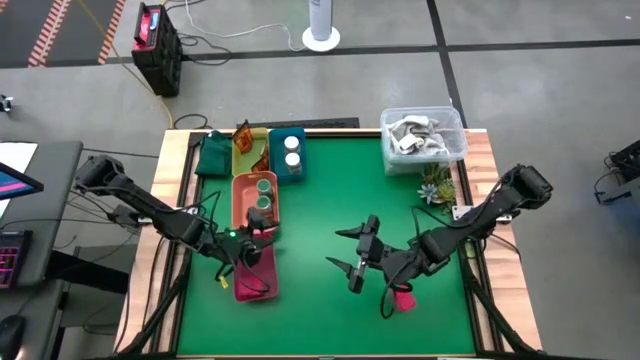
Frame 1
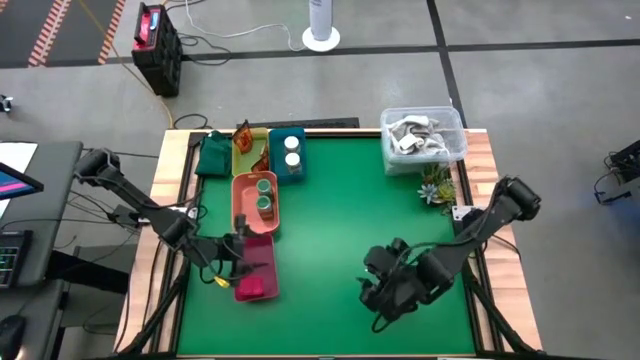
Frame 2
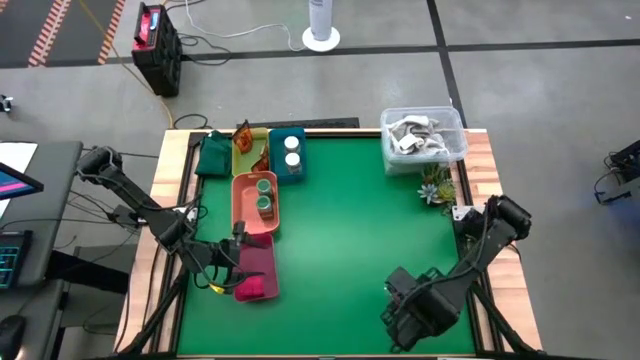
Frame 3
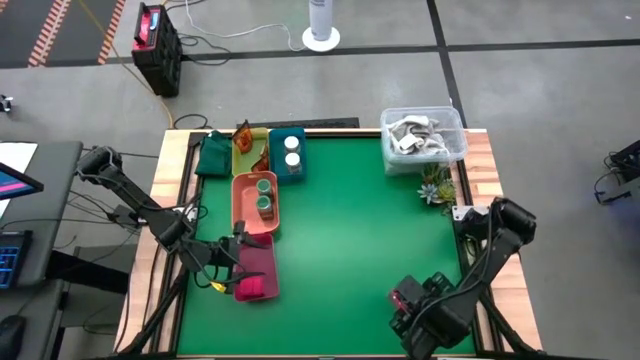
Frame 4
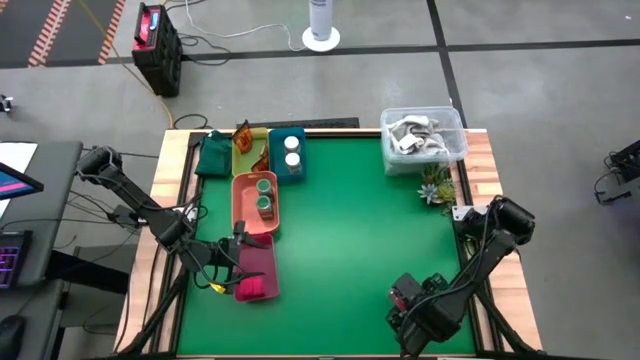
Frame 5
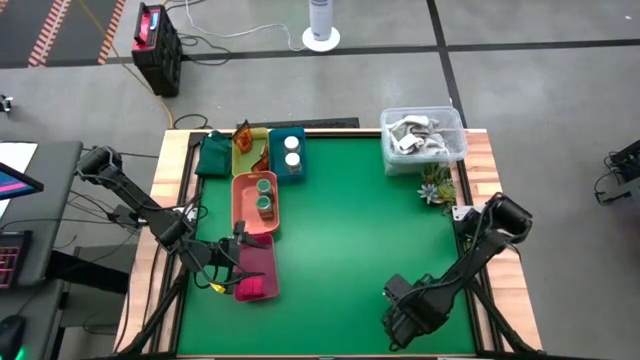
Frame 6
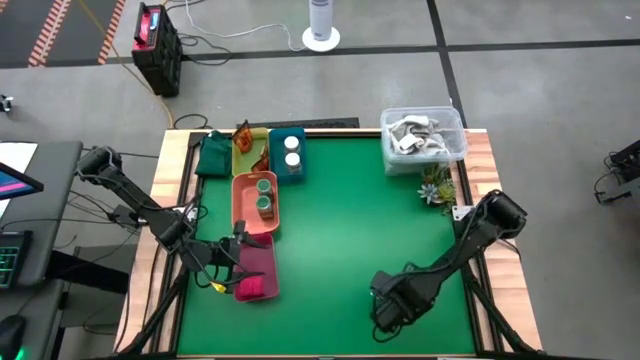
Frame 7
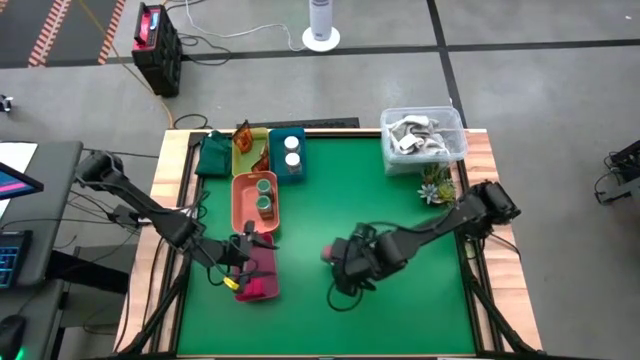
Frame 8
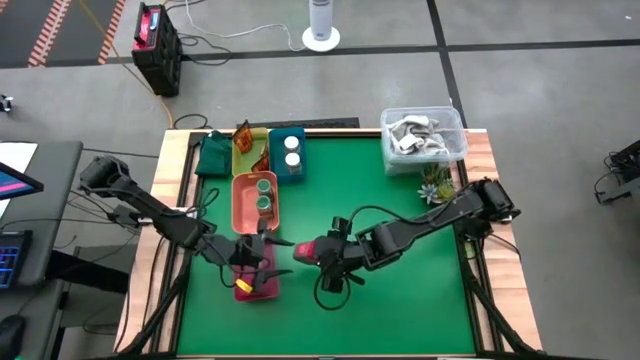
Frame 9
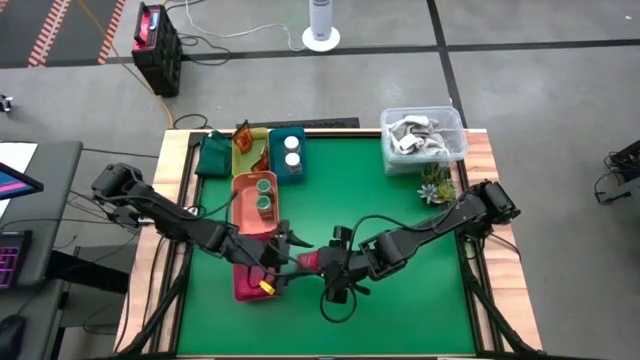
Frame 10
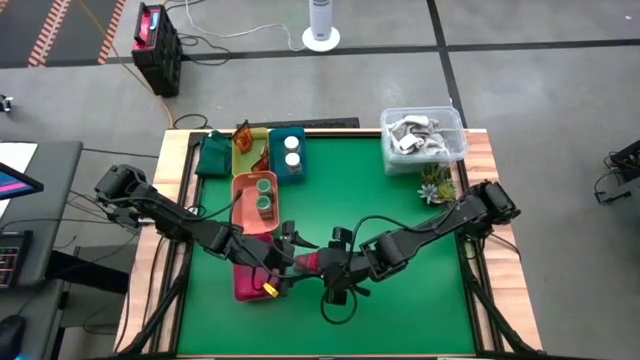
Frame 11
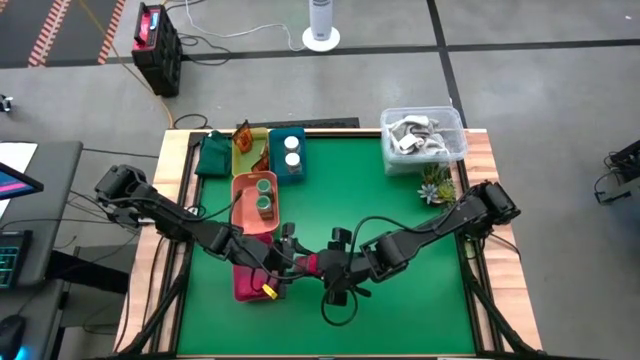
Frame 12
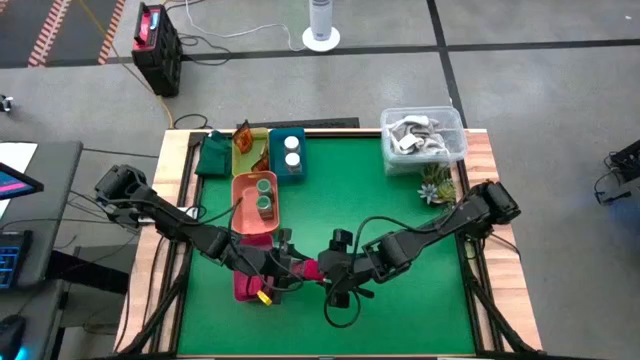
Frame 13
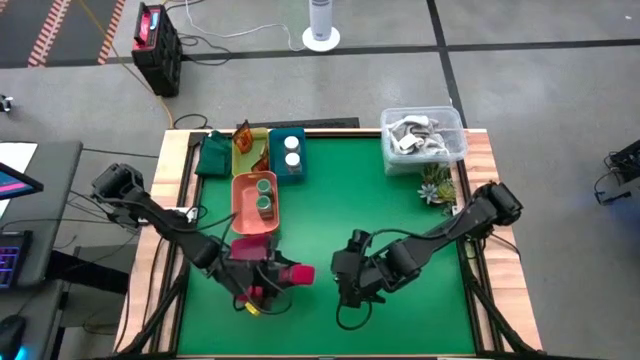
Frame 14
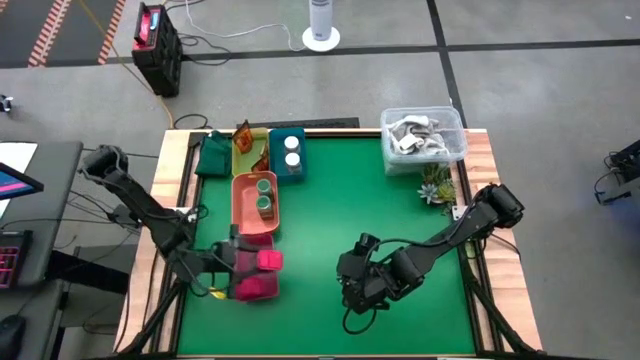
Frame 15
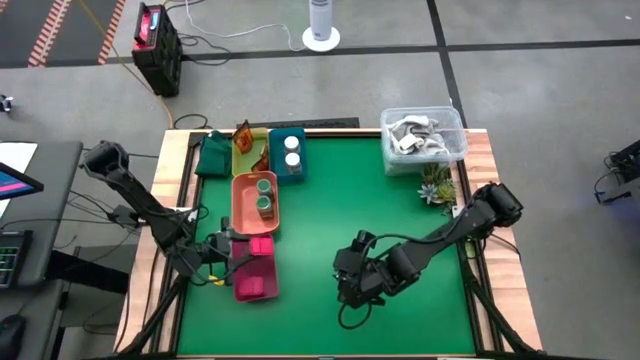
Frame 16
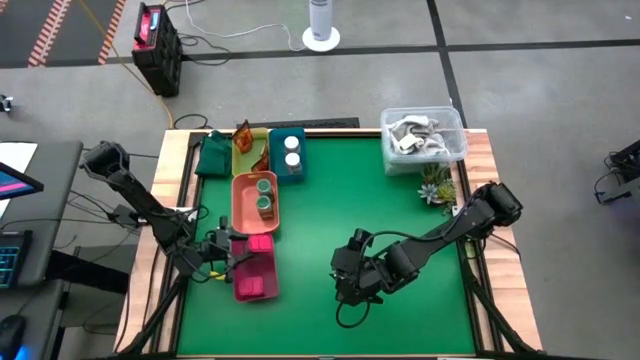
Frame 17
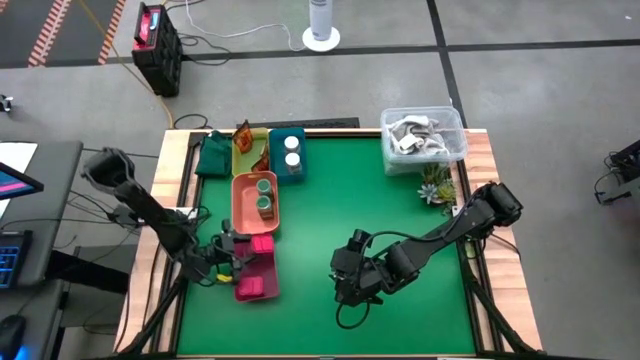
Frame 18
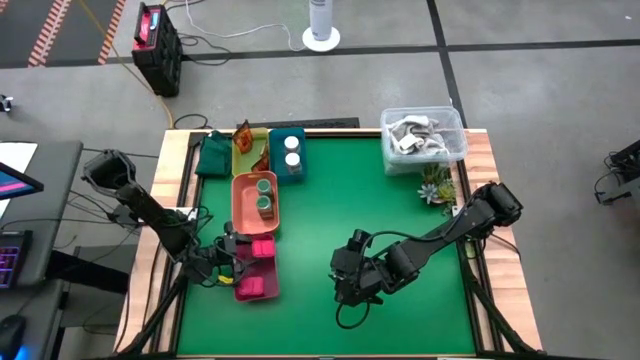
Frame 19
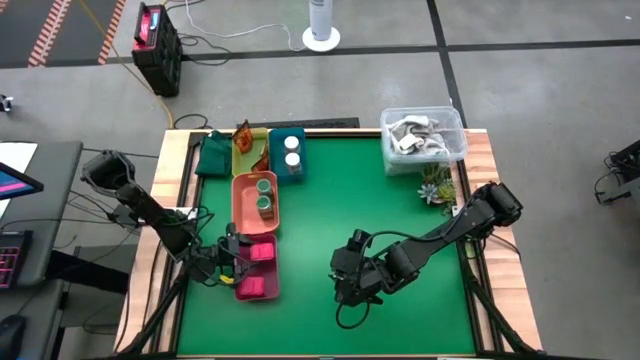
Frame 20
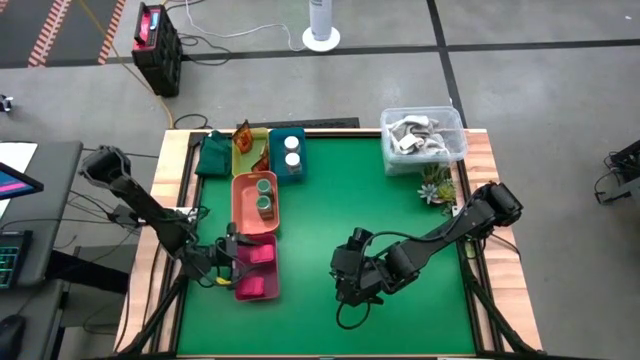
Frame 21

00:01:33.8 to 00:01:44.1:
Task: Sort spices by type
Put the red seasoning can into the pink bin

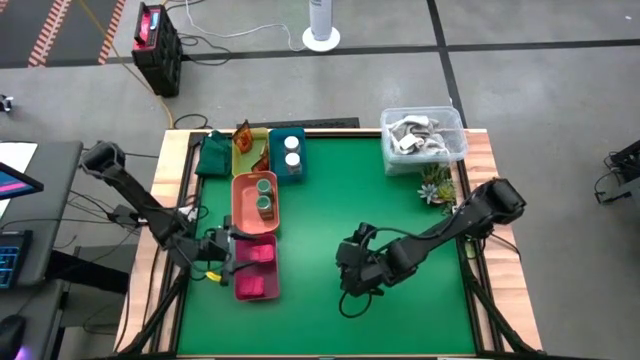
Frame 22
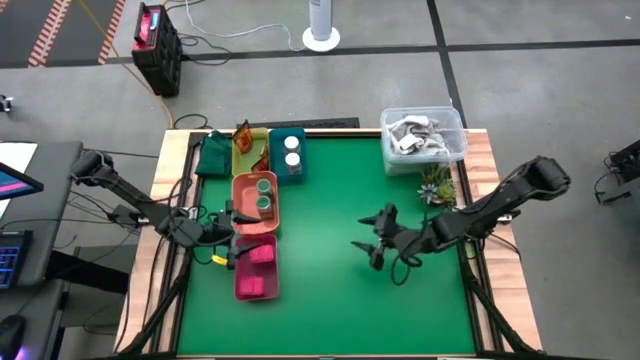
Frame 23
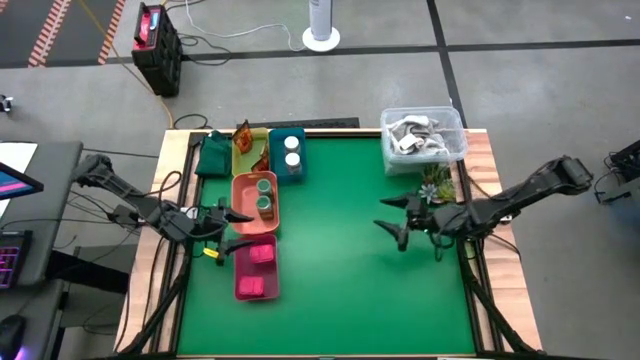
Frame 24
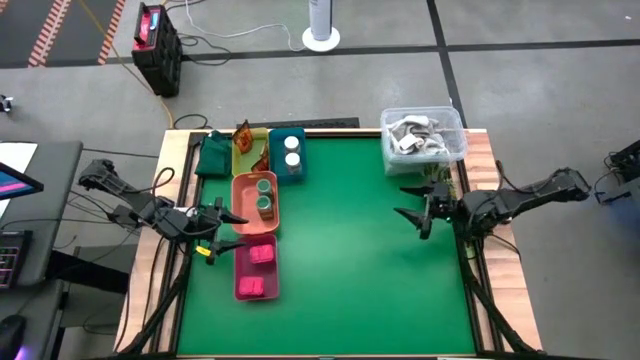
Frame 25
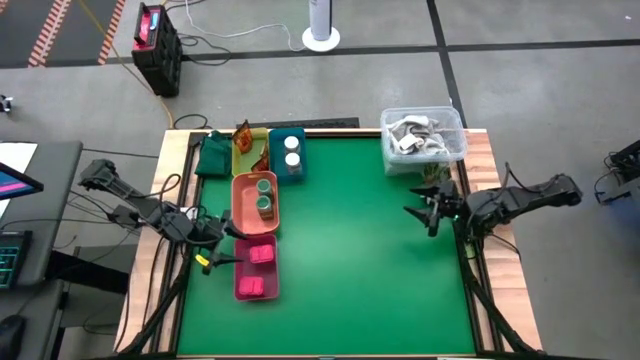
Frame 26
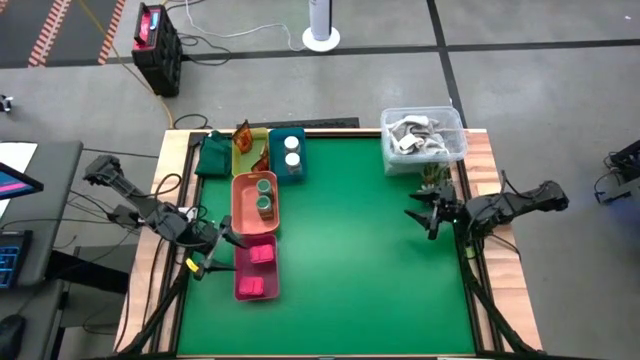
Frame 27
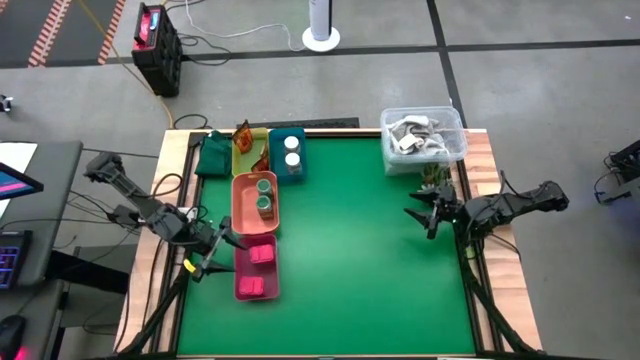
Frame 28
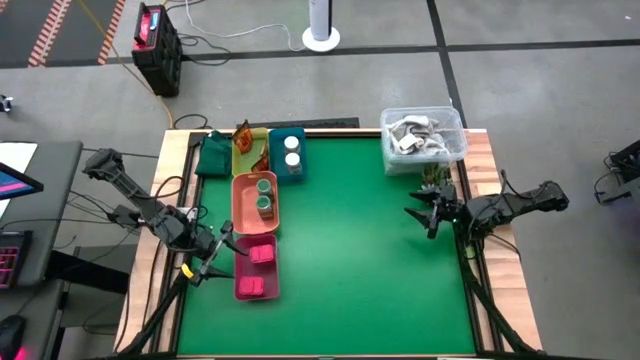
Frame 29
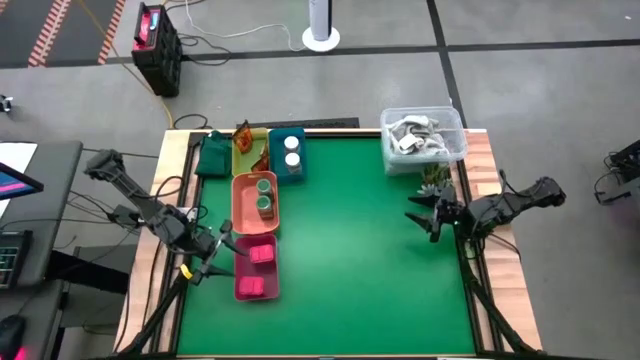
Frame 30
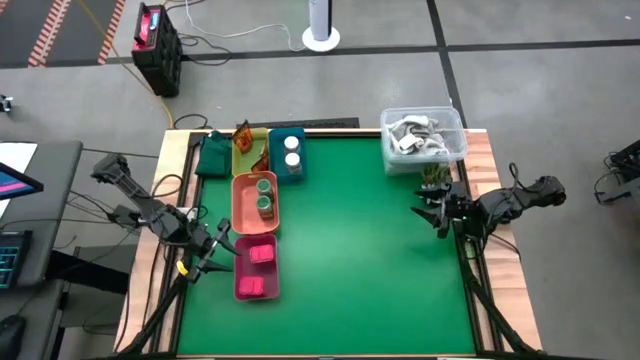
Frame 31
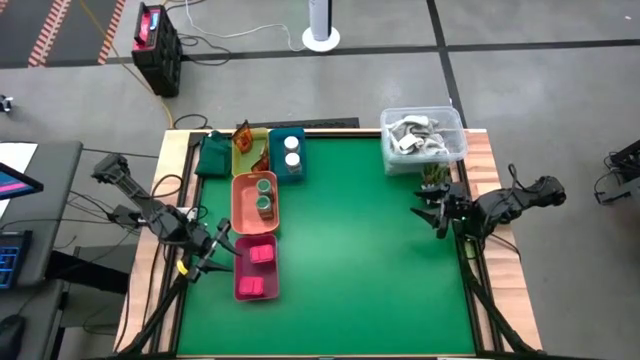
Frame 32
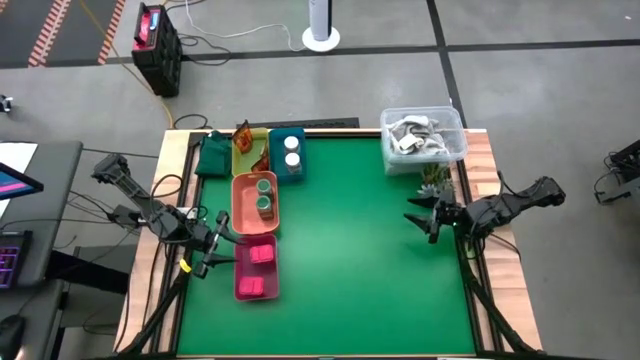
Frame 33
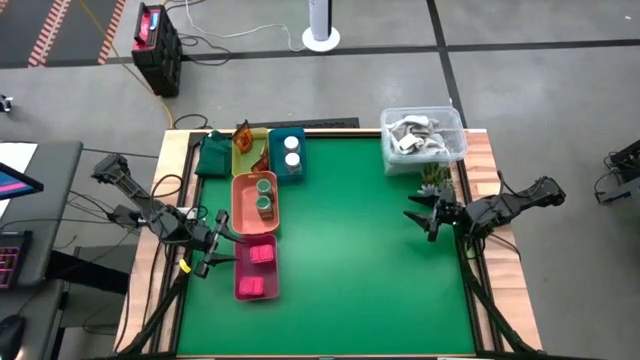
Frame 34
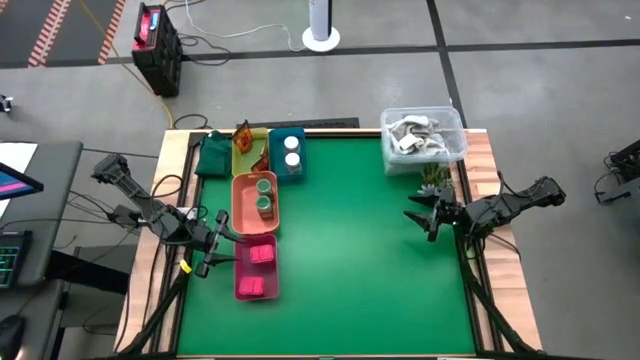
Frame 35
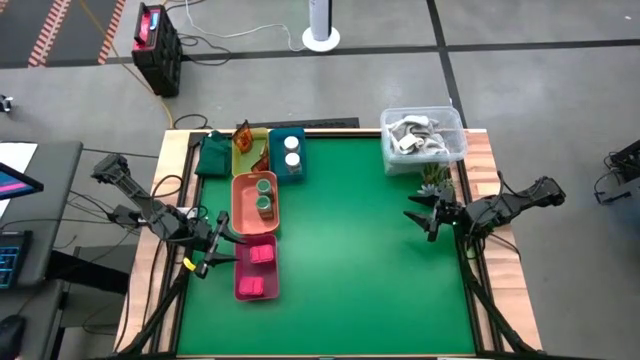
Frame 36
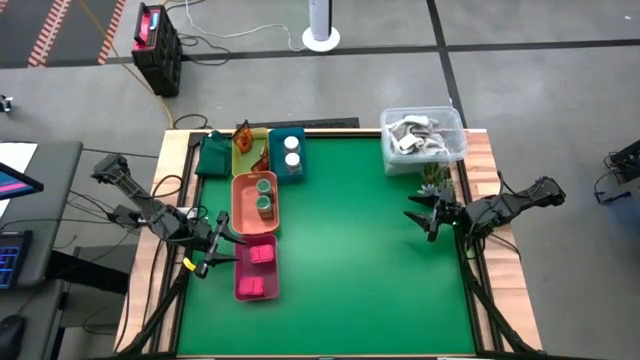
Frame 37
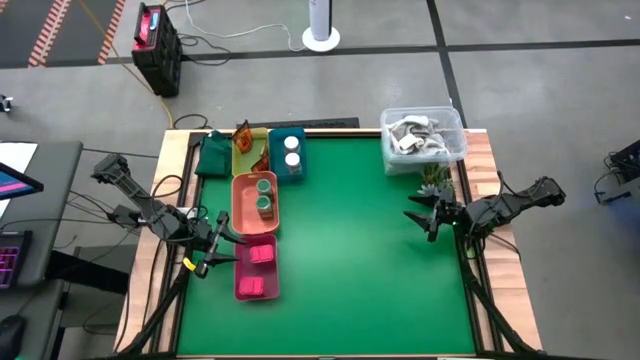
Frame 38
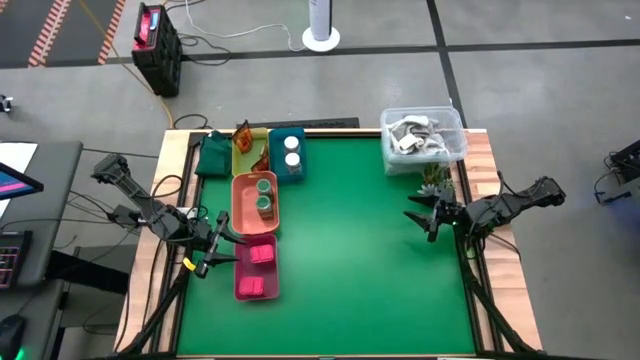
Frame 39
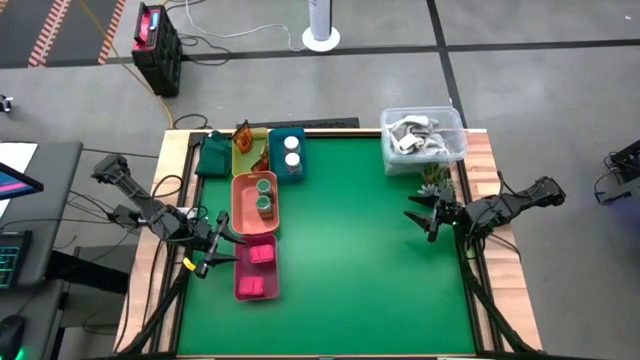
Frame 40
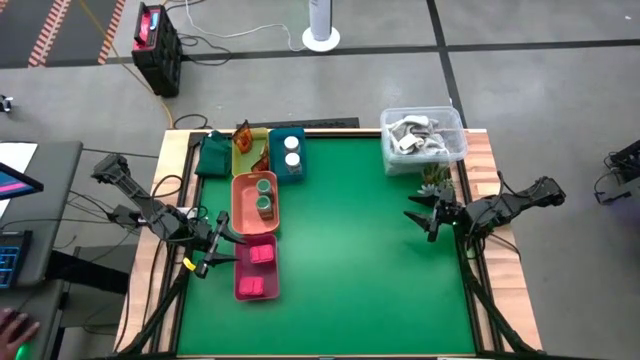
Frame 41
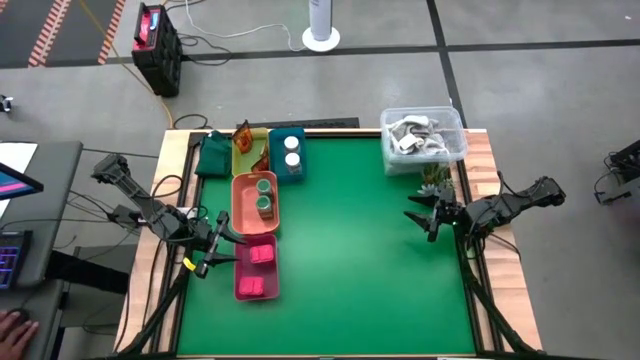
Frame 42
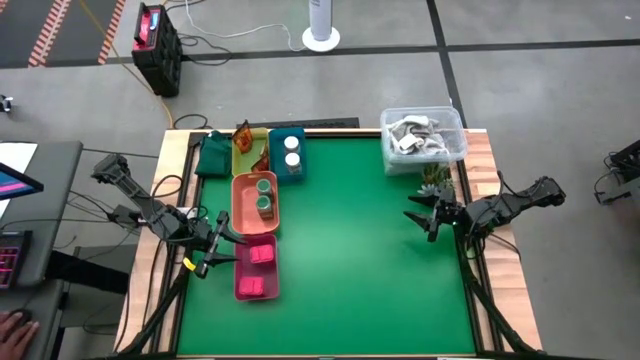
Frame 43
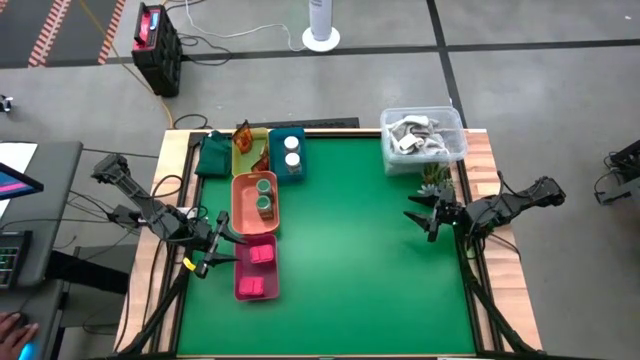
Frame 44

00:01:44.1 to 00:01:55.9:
Return to Home Position

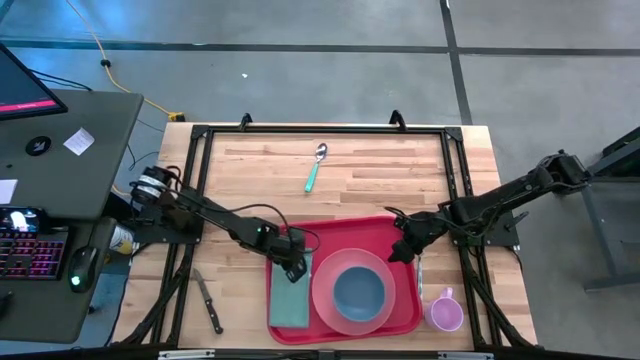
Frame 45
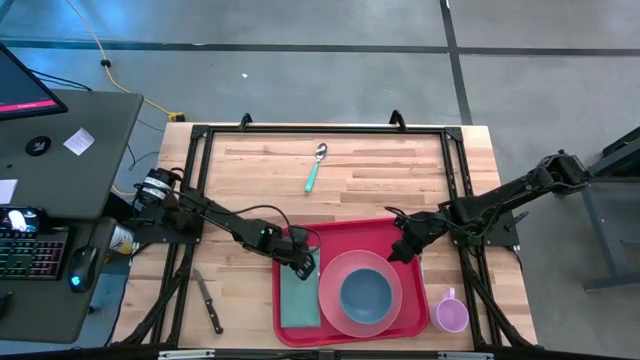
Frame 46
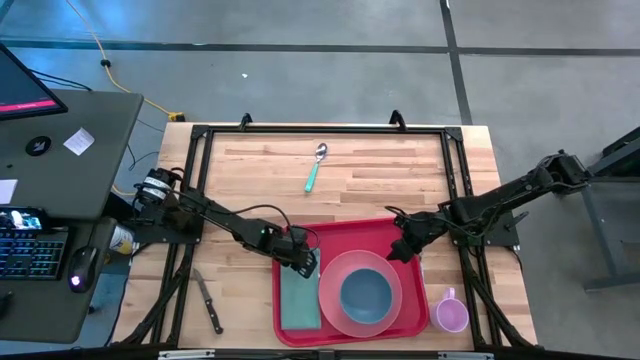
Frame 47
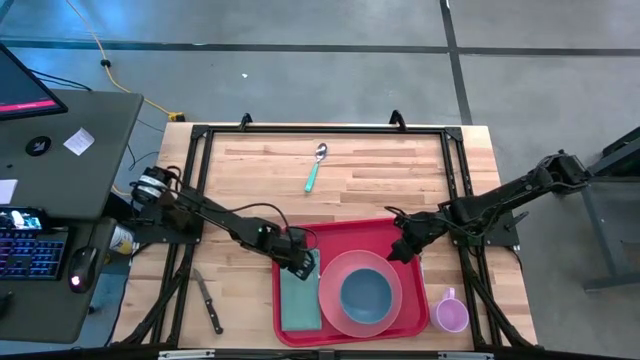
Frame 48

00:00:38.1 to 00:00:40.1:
Task: Set up tray
Adjust the blue napkin on the red tray
